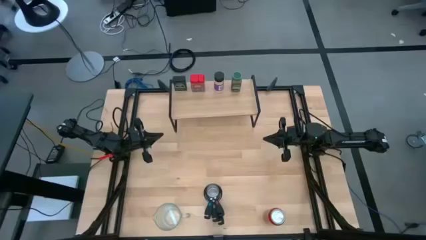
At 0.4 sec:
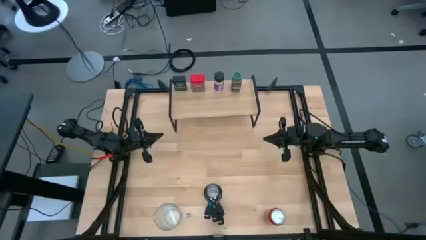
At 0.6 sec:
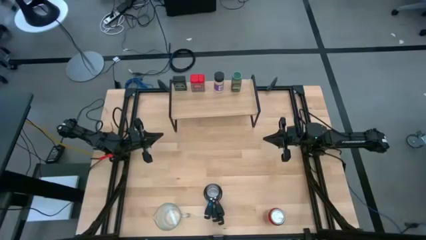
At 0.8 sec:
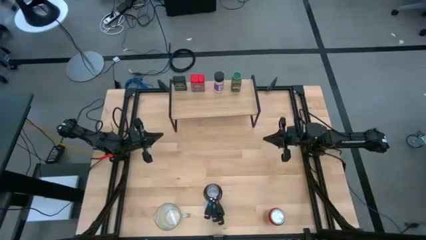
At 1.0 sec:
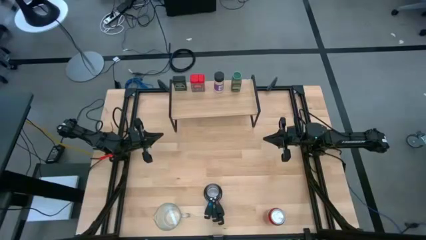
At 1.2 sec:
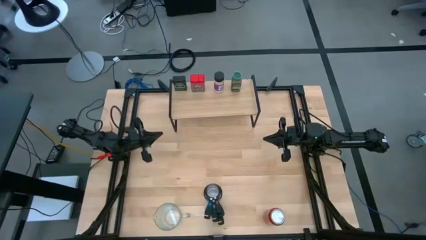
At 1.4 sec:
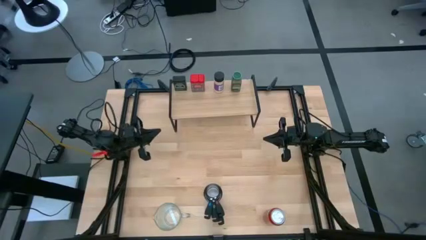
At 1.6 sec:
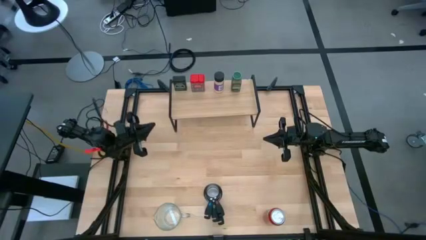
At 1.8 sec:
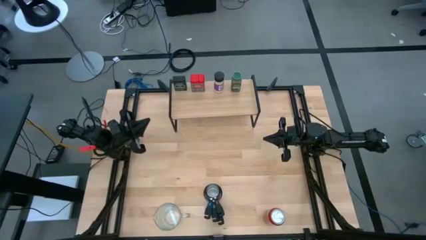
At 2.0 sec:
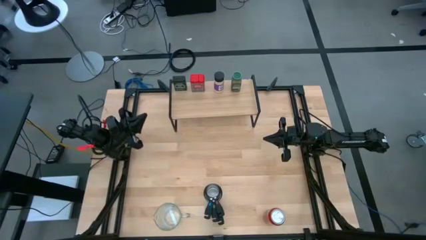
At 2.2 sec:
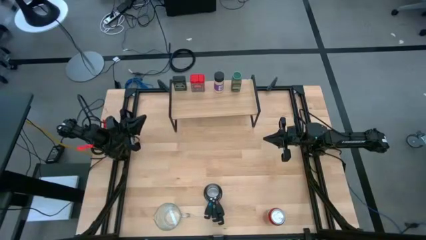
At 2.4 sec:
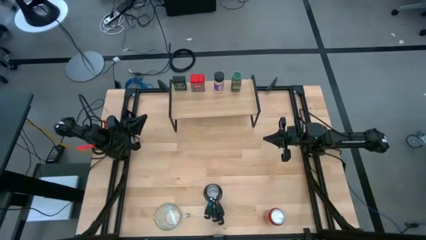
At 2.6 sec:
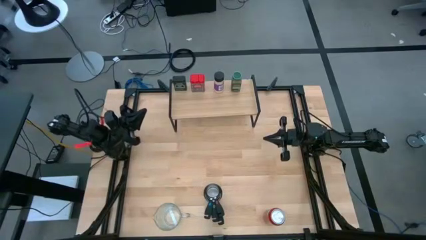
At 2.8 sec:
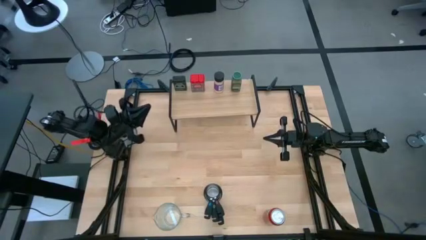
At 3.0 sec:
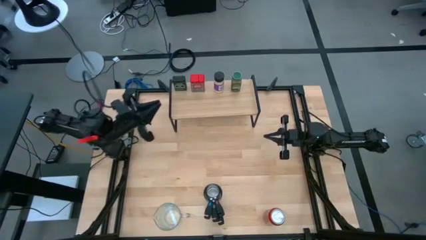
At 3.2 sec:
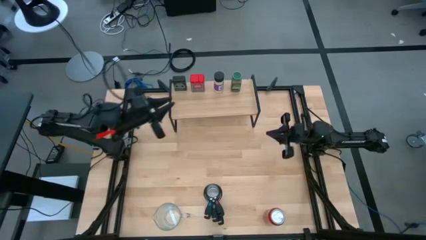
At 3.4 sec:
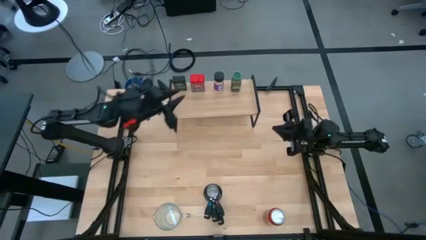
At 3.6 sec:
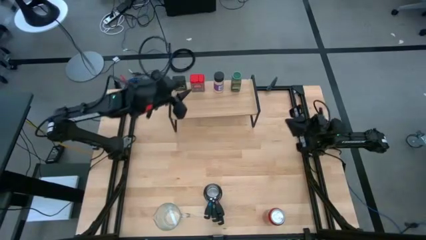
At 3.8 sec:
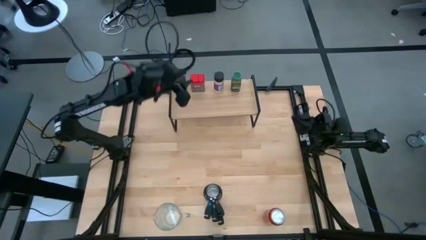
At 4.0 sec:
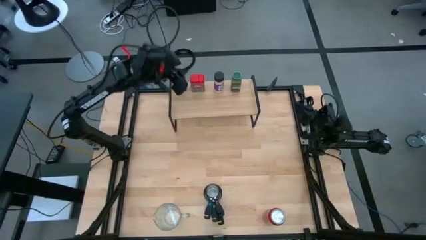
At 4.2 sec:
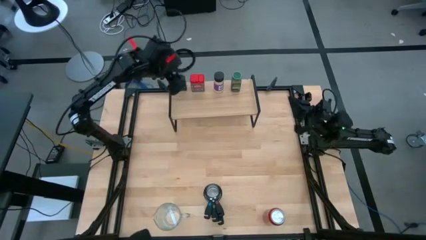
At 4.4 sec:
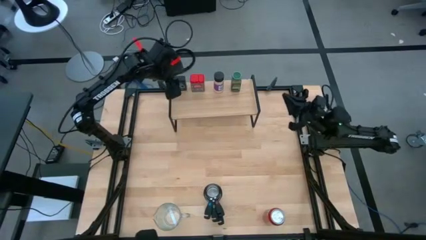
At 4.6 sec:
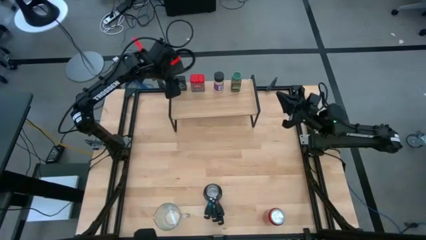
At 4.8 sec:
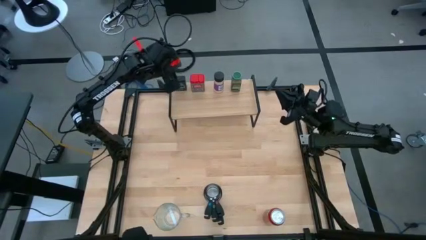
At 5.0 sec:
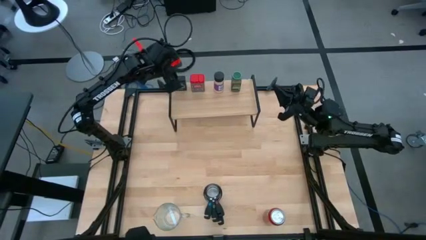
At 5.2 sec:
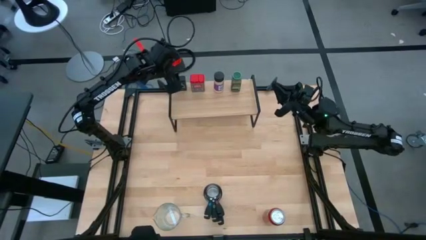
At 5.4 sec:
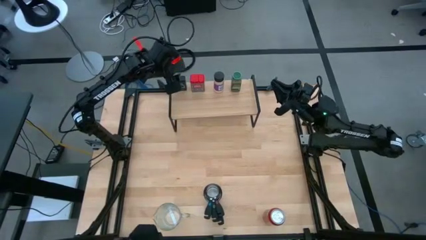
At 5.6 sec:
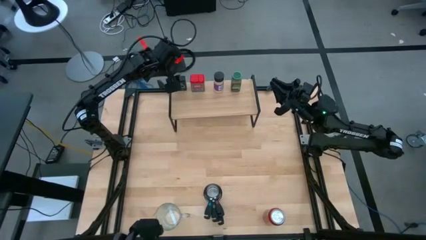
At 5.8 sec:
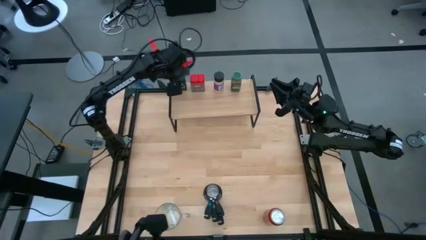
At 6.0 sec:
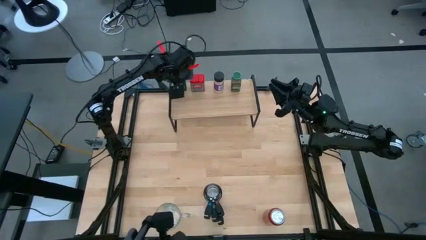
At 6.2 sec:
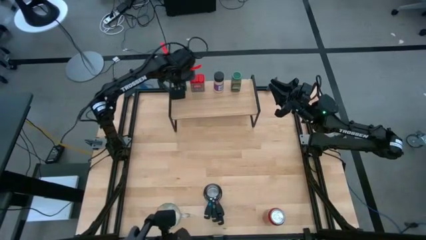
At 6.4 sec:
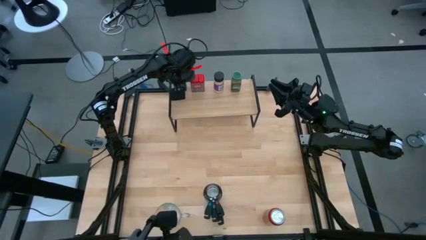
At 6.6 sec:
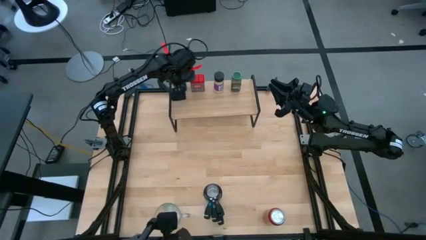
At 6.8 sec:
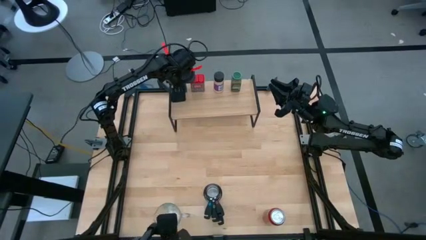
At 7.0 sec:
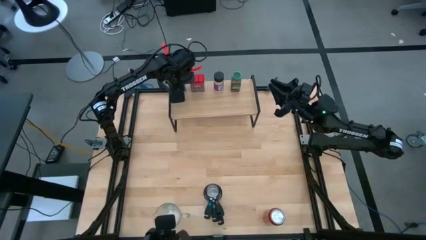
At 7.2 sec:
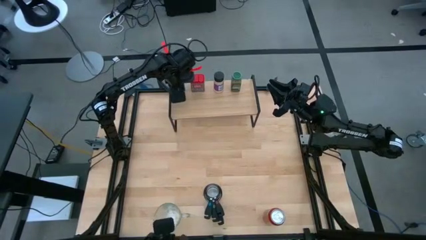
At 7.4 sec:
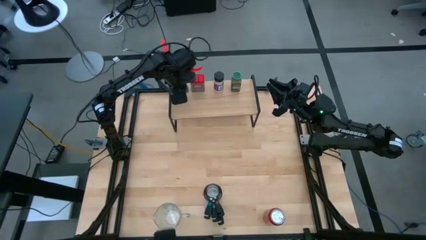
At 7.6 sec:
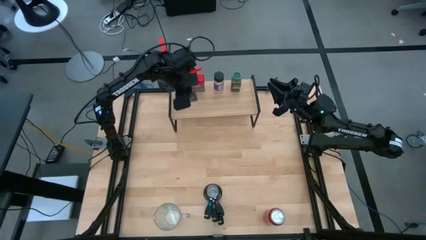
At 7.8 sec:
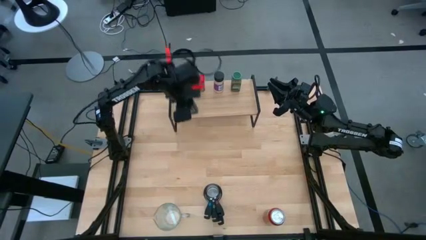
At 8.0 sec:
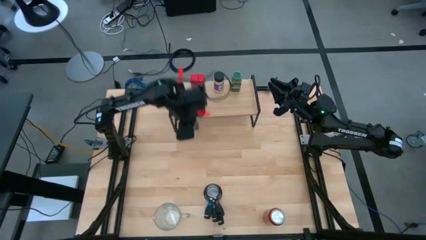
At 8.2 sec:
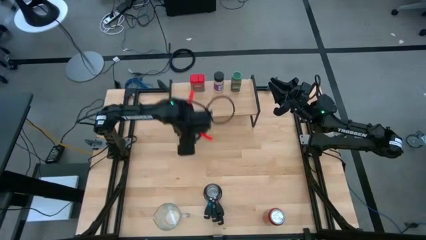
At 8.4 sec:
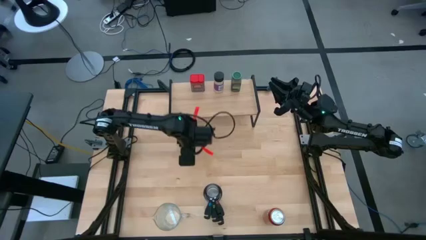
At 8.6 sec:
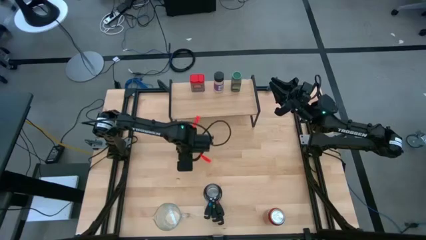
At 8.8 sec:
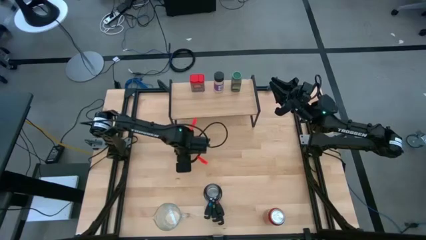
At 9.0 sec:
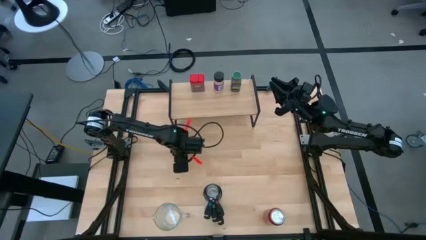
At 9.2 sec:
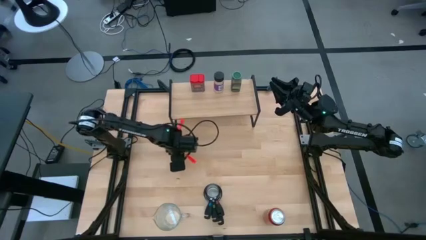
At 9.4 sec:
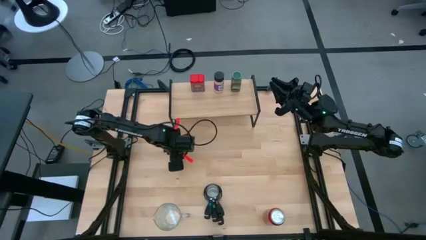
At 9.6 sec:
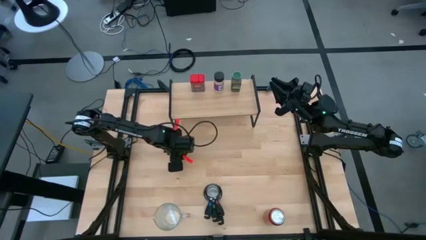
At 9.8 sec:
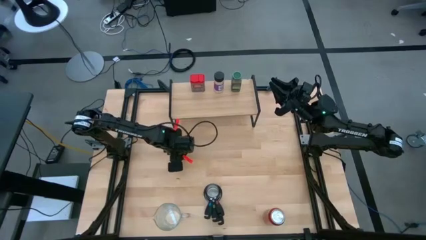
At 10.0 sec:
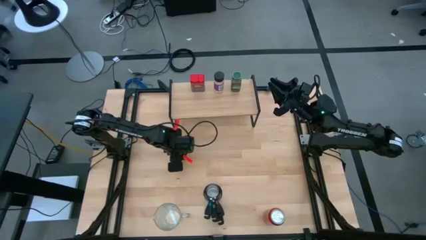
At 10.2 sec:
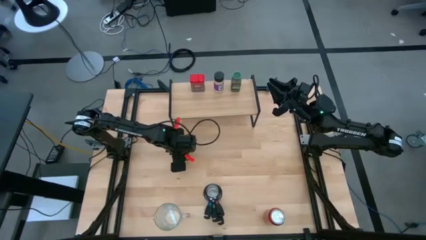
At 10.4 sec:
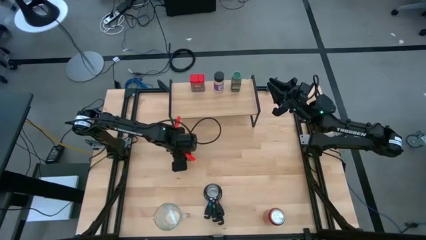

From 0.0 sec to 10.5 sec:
Task: Shelf spices
Remove the black seasoning can from the shelf

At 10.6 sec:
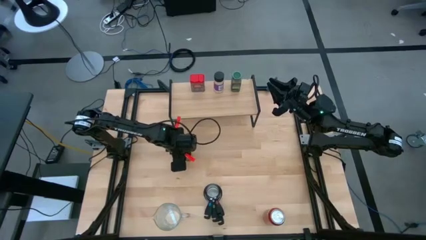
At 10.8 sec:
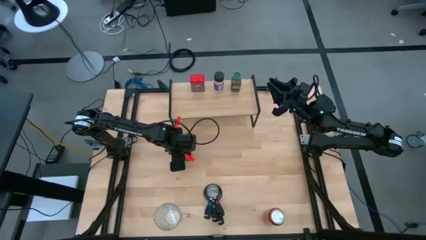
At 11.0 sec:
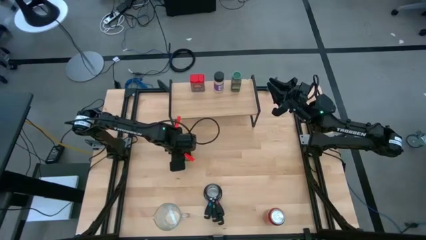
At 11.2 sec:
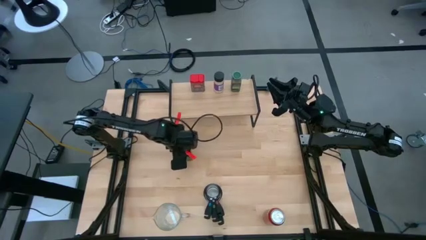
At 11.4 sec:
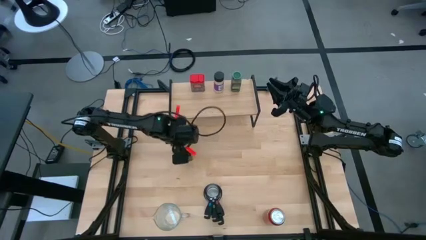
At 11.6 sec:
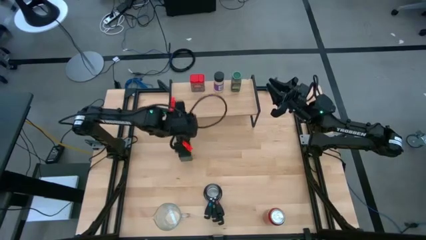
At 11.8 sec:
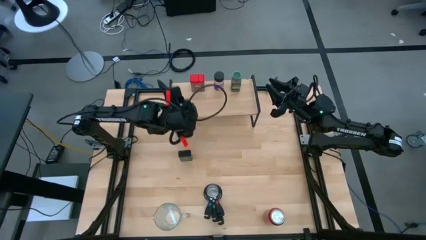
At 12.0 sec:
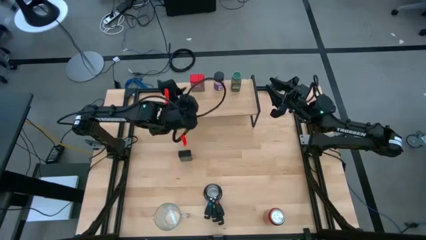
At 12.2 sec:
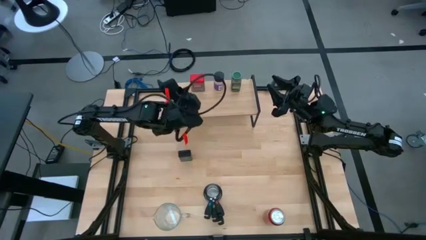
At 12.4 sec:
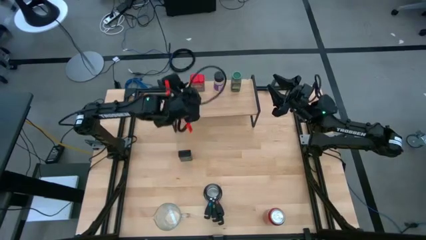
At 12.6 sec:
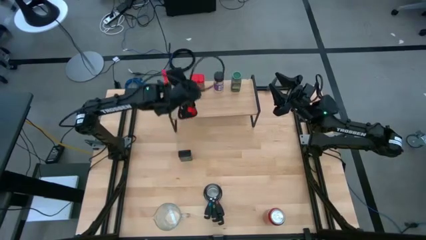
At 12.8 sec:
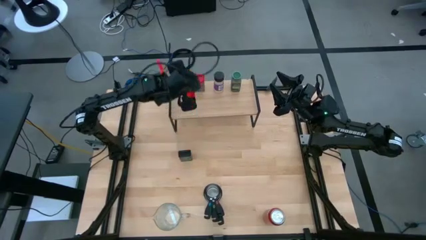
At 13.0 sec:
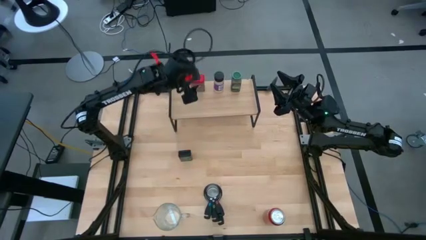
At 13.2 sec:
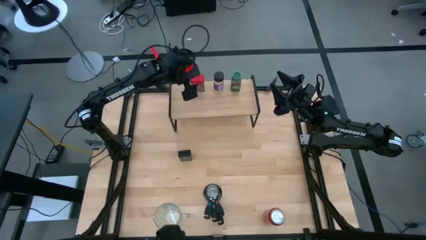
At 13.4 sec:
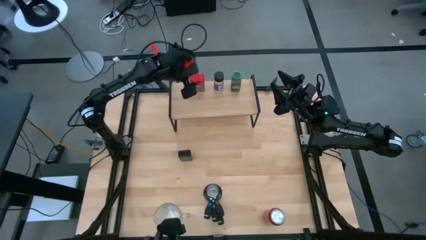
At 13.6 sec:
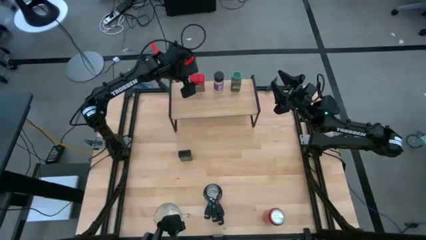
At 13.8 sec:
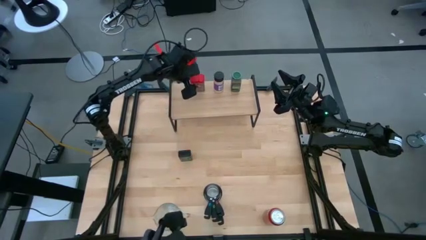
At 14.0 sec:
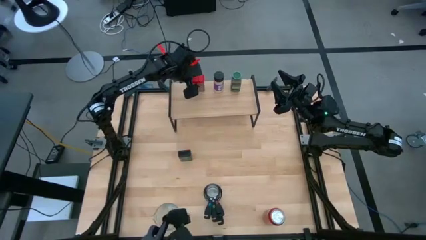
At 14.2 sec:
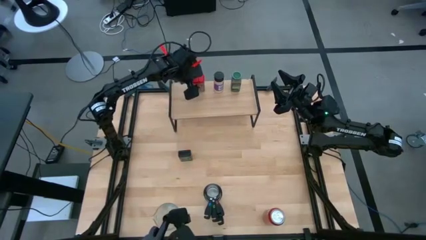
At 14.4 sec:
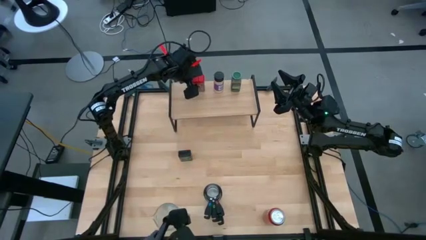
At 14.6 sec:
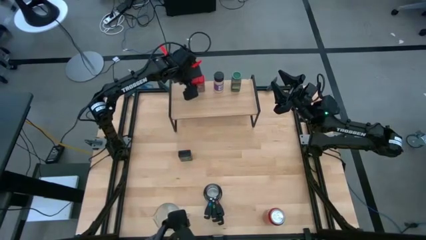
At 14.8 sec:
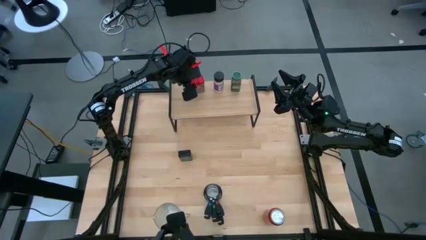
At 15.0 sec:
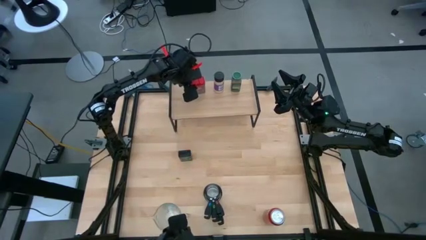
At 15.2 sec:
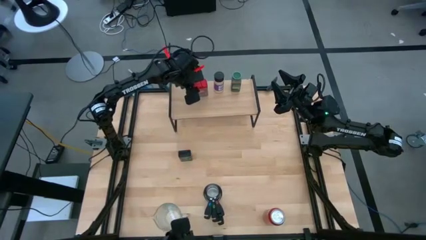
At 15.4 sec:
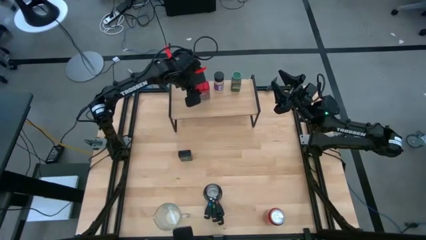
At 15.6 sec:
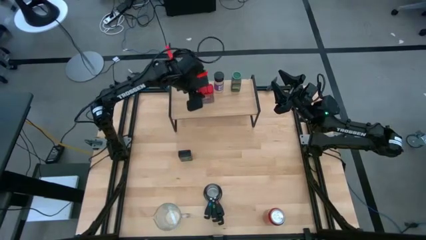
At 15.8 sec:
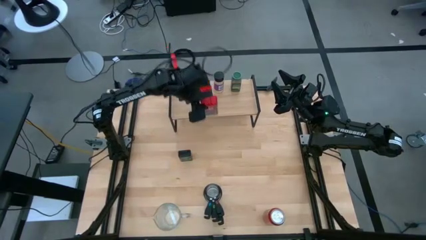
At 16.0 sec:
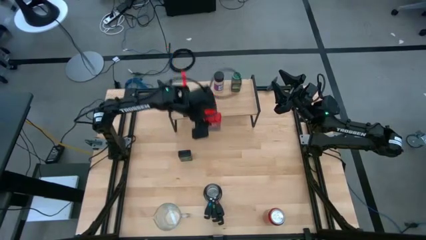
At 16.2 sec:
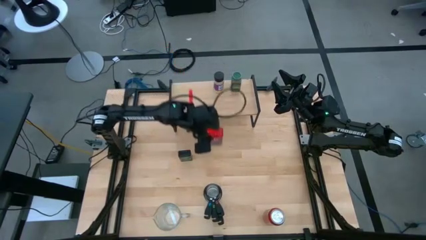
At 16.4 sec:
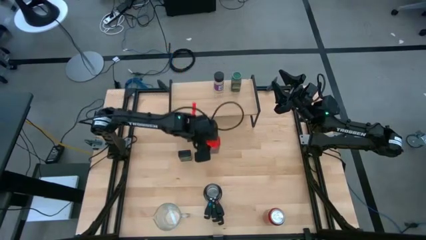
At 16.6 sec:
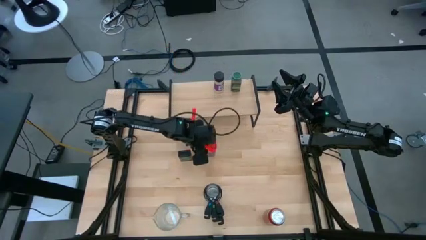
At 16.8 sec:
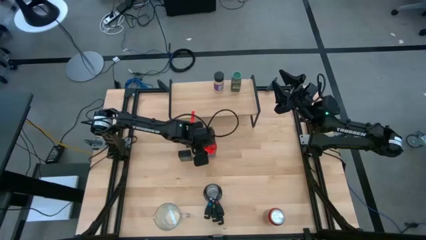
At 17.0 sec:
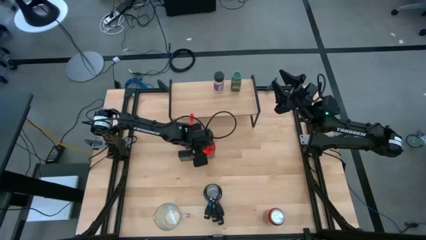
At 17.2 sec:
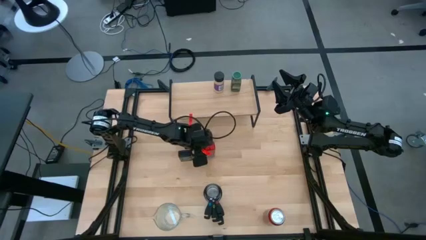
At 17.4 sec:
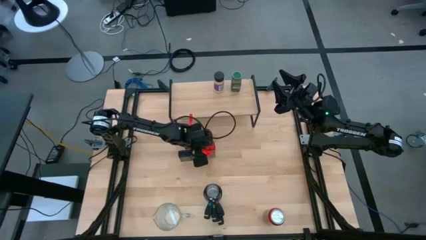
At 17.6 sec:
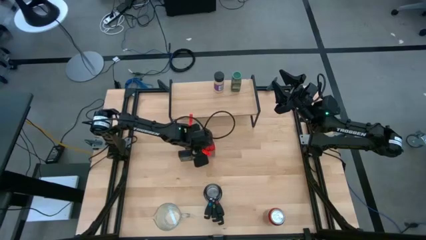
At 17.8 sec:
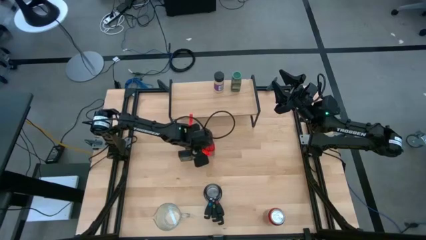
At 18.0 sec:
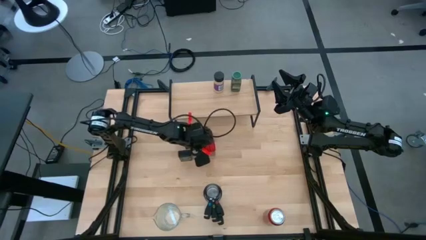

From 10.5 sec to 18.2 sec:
Remove the red seasoning can from the shelf
